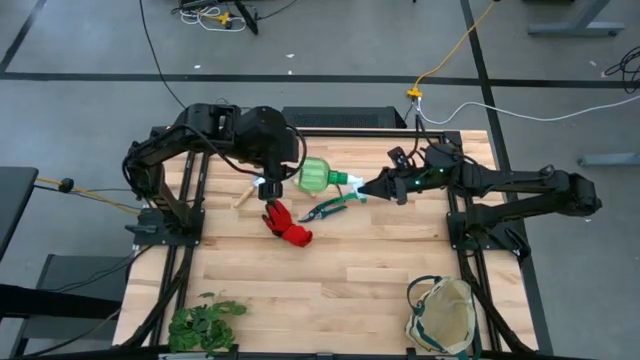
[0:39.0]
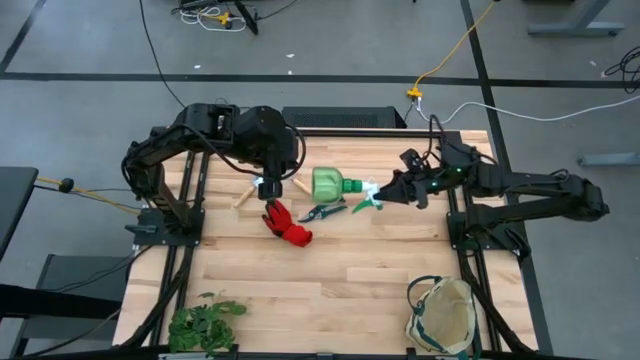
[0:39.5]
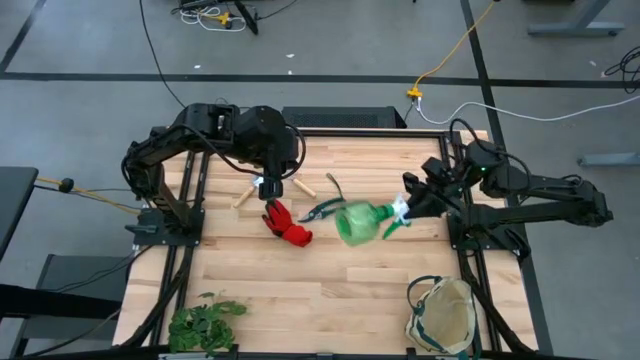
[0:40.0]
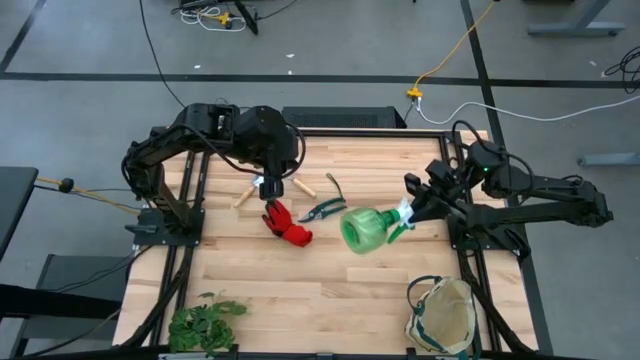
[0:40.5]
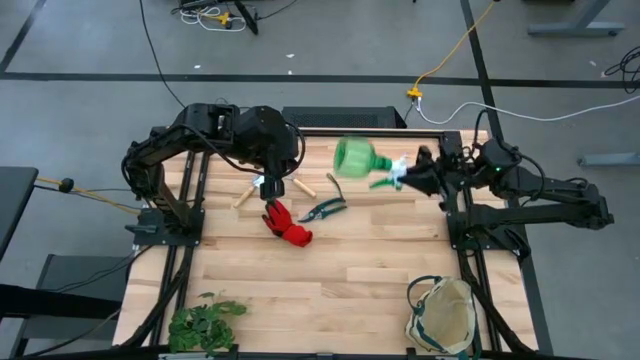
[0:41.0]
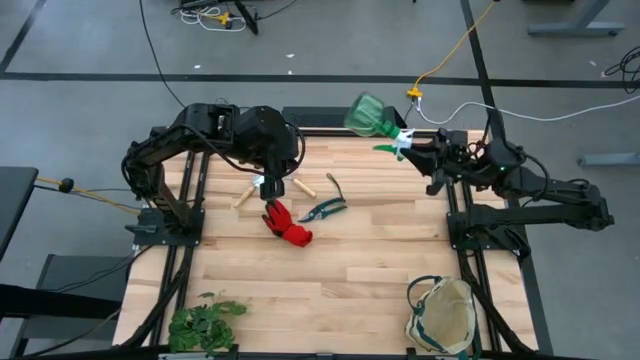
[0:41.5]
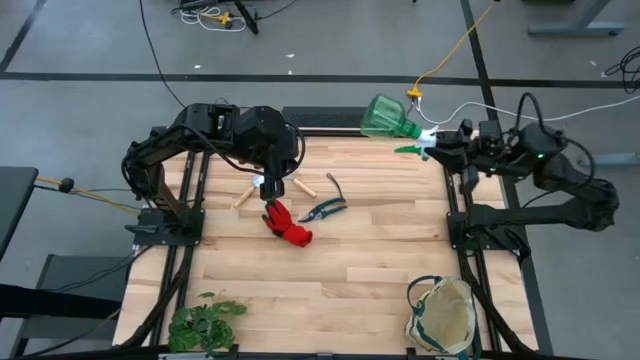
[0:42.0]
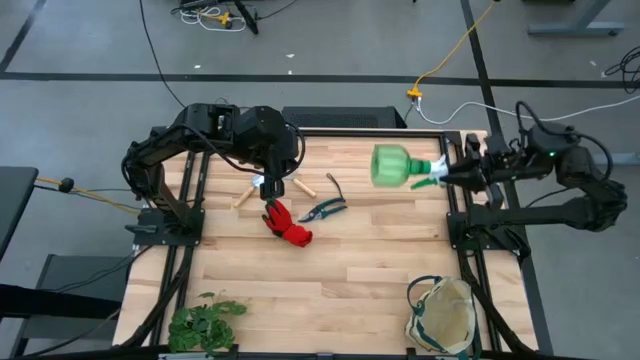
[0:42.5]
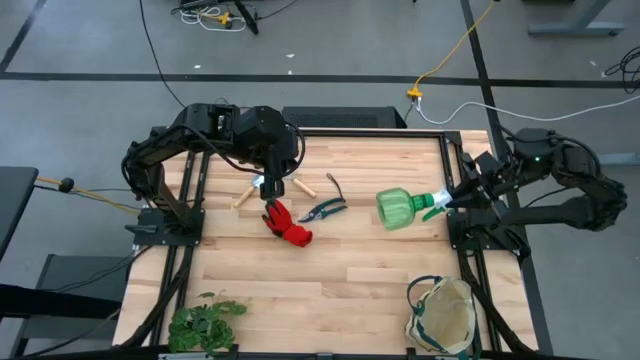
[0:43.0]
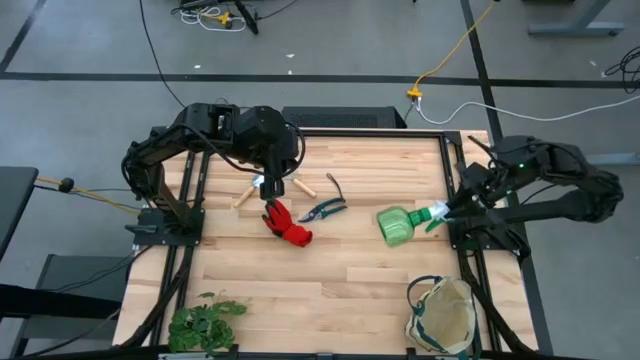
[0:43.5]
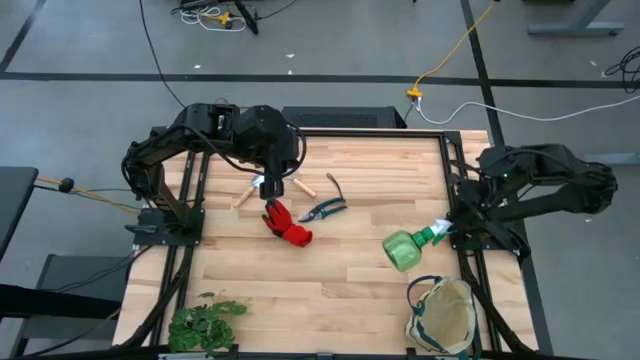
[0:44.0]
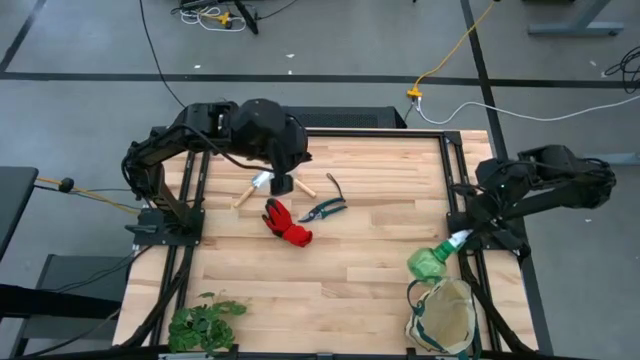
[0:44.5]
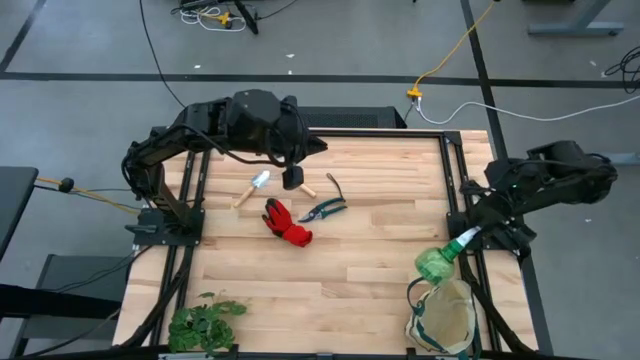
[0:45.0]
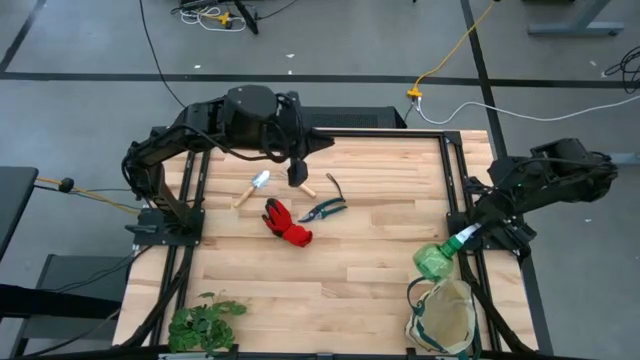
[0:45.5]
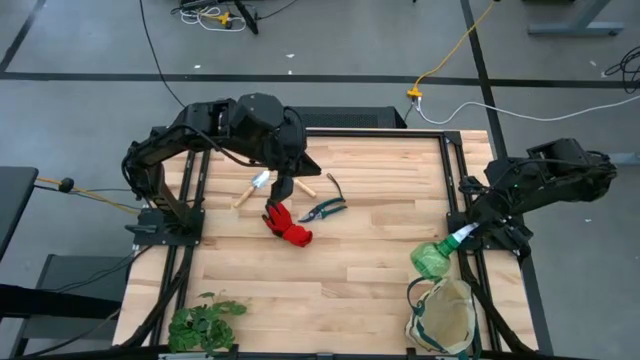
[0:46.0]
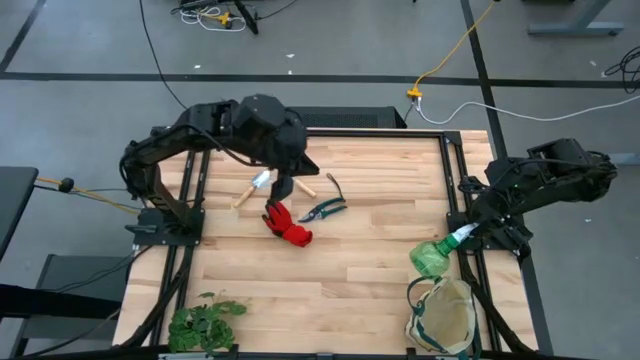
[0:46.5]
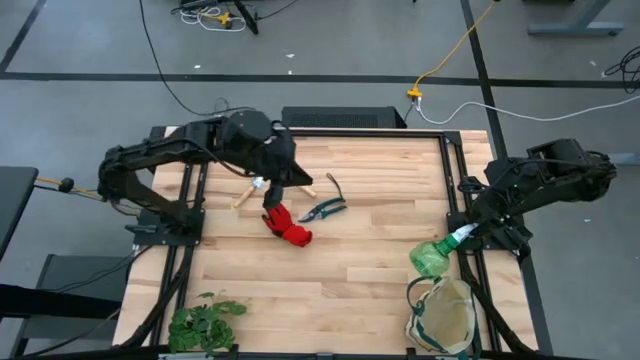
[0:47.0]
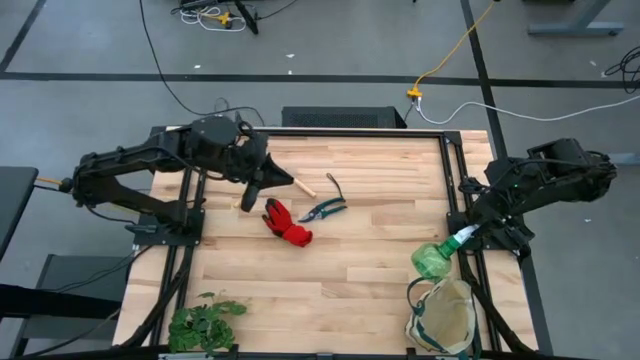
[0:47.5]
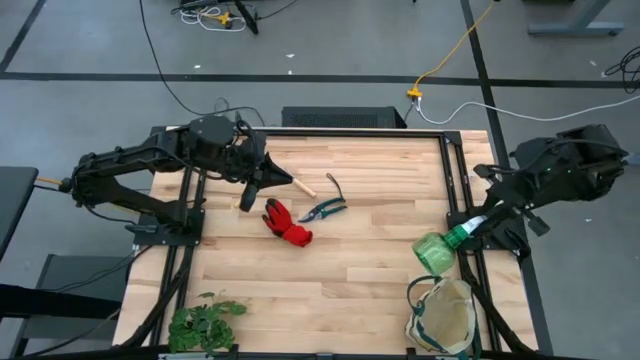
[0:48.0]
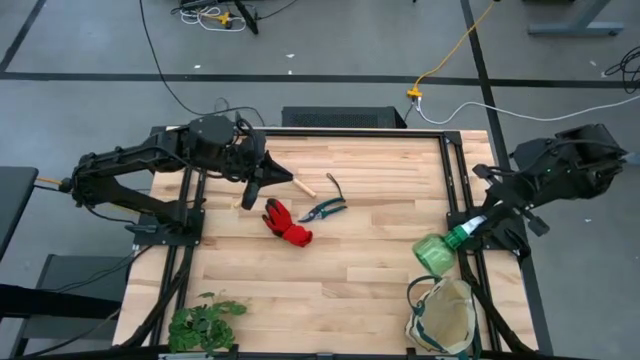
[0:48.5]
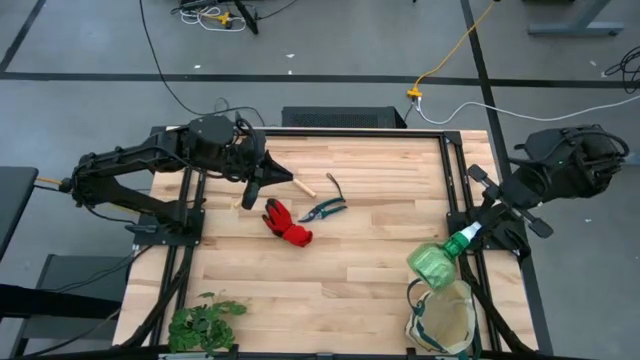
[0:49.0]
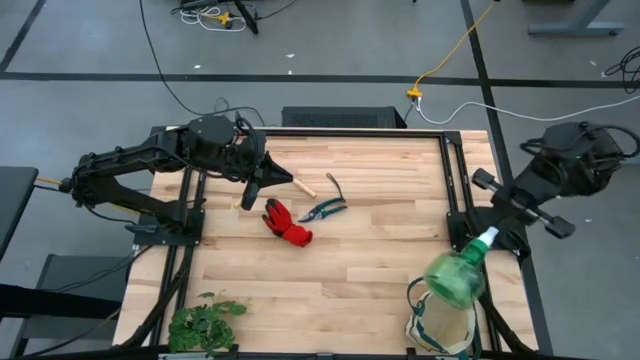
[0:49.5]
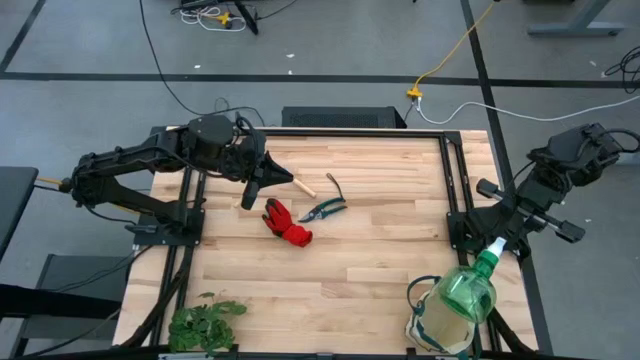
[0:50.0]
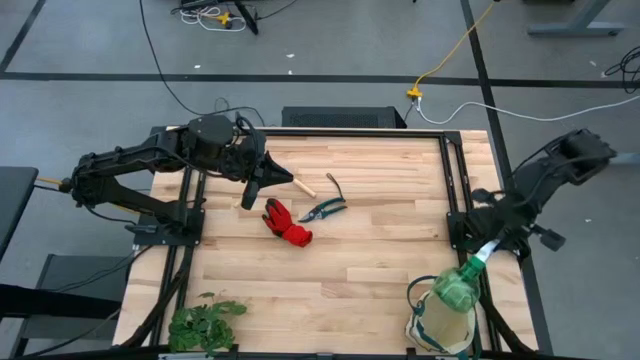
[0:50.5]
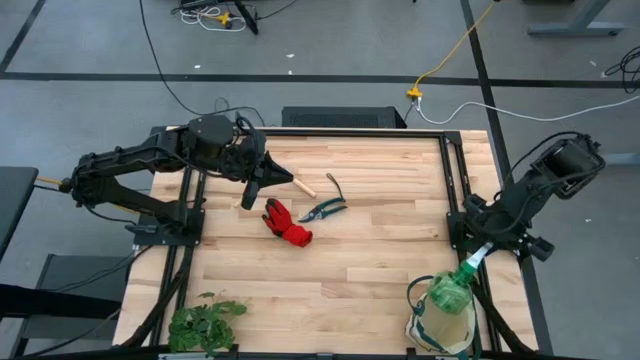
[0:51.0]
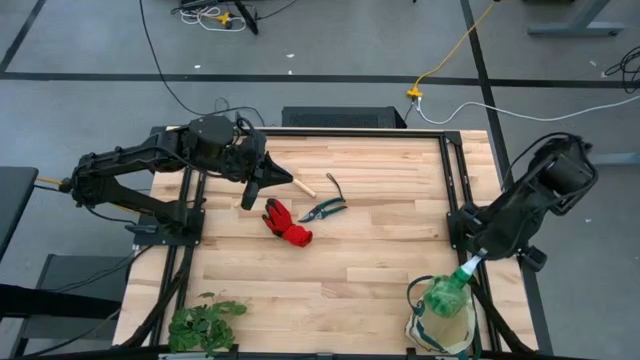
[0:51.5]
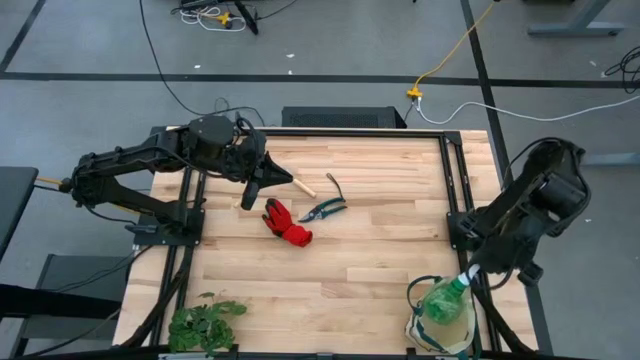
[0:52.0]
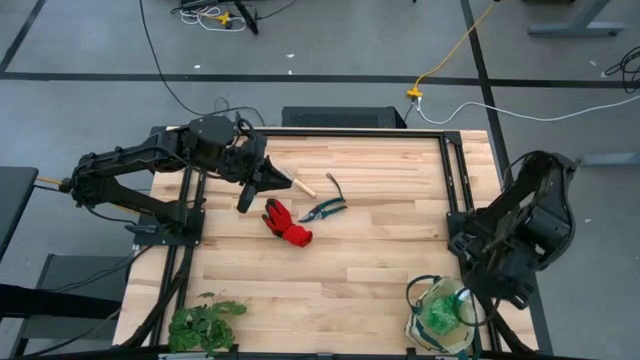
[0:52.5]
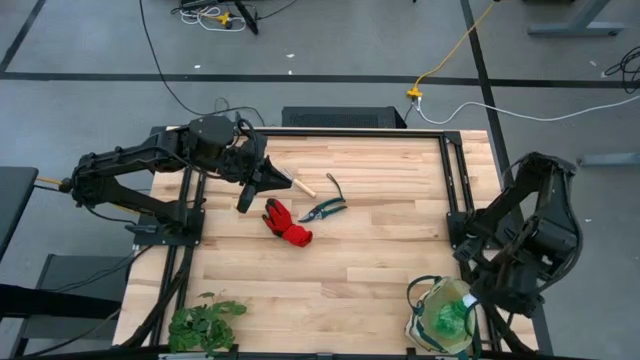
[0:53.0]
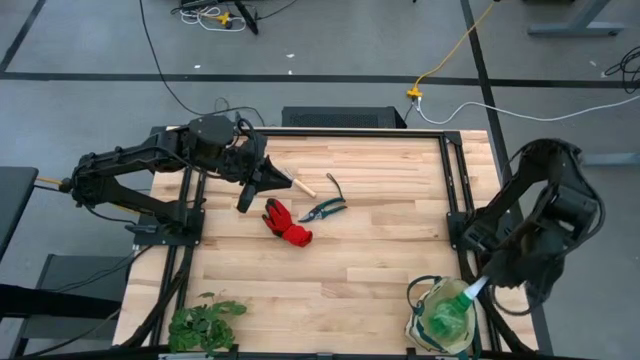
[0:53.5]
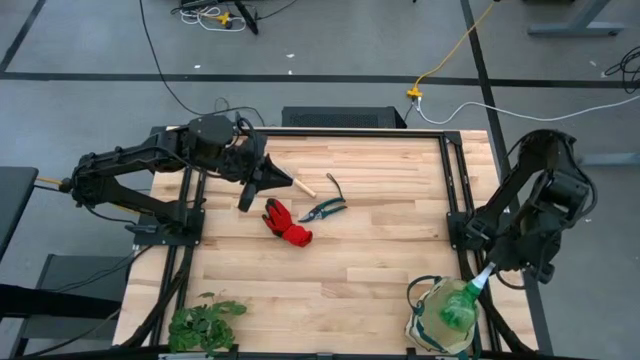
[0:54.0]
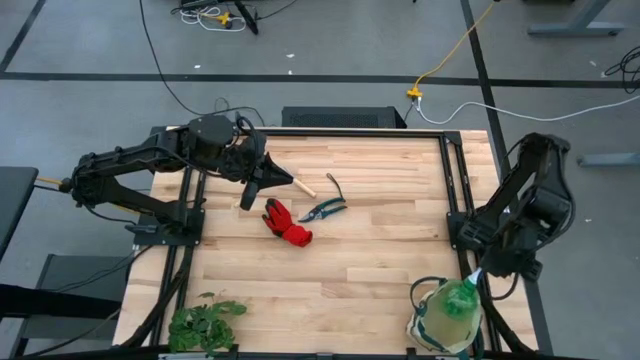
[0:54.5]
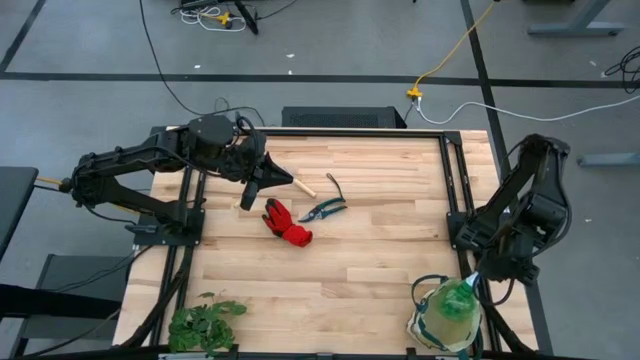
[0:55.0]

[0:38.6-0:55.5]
Task: Pick & Place Garden tools in Gardening bag
Put the green spray into the gardening bag

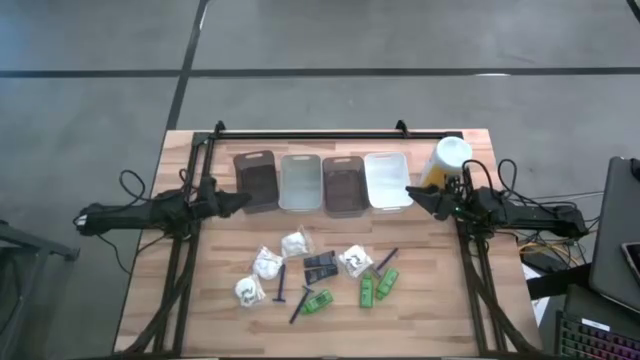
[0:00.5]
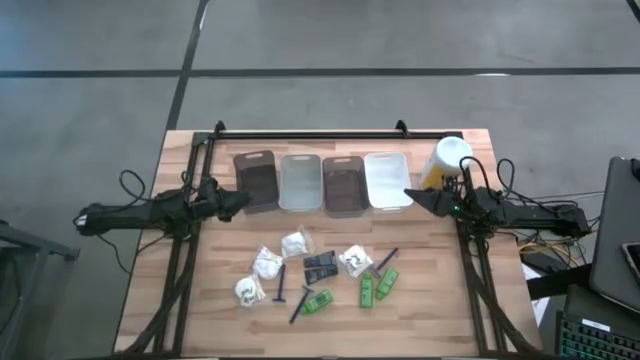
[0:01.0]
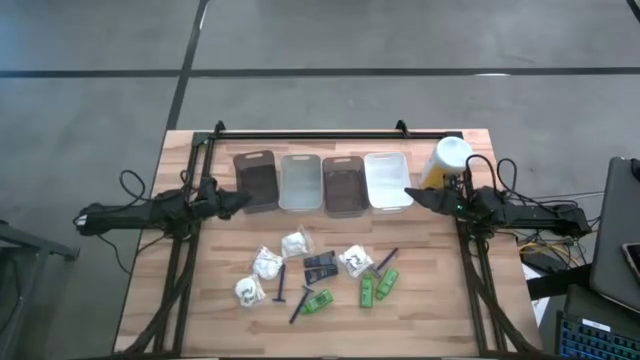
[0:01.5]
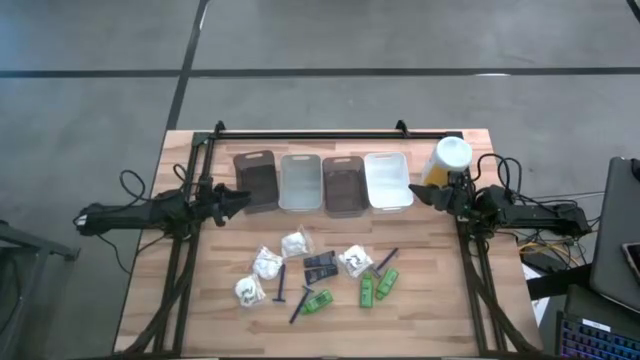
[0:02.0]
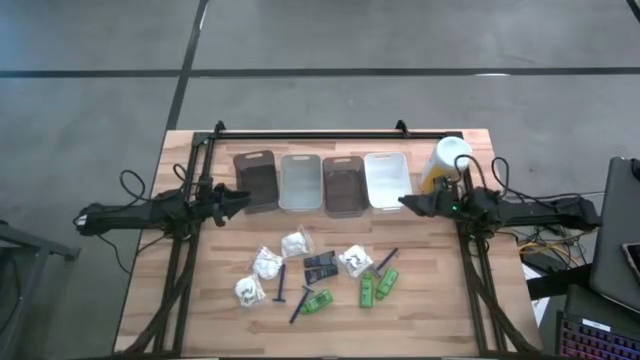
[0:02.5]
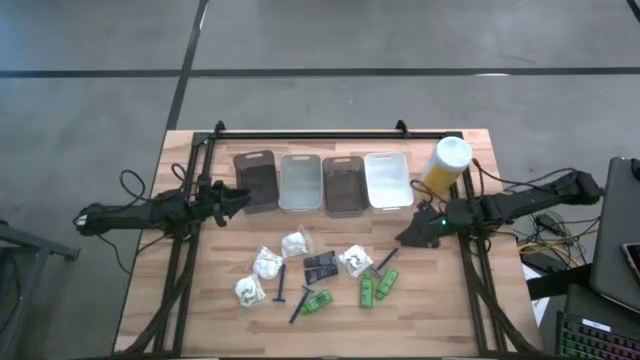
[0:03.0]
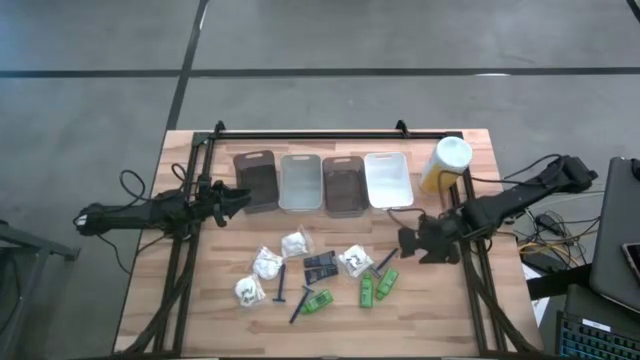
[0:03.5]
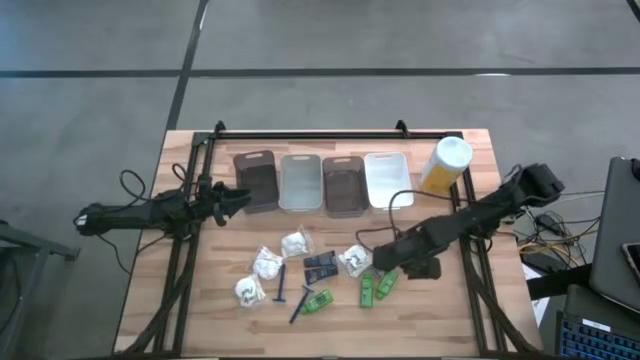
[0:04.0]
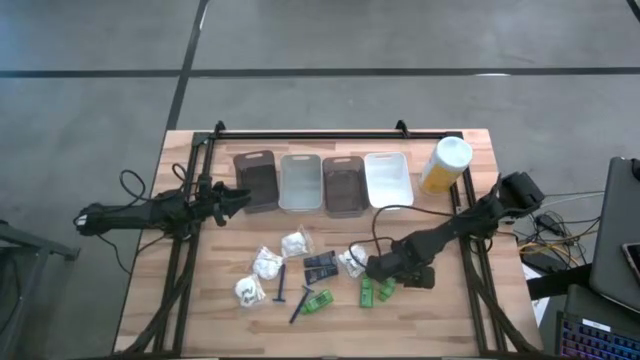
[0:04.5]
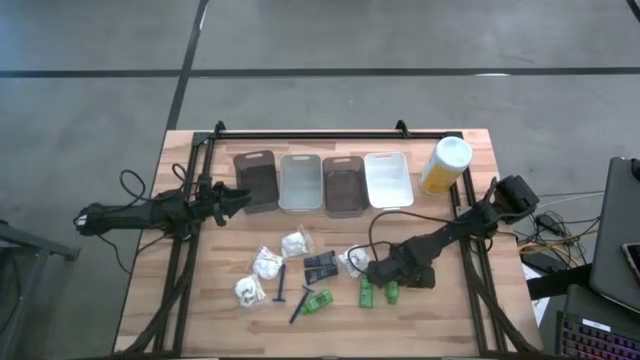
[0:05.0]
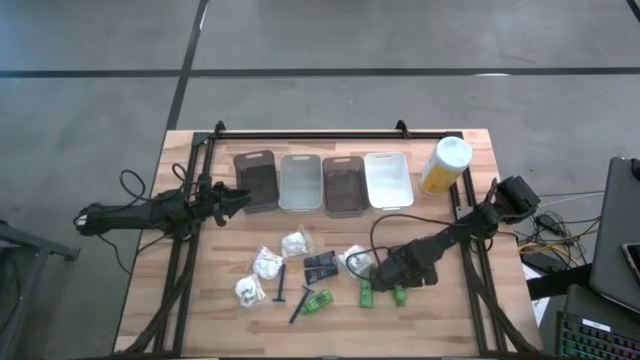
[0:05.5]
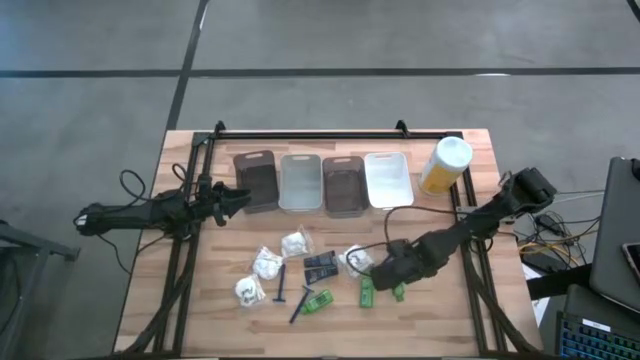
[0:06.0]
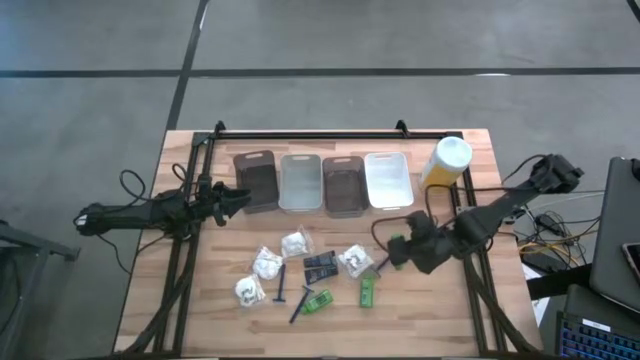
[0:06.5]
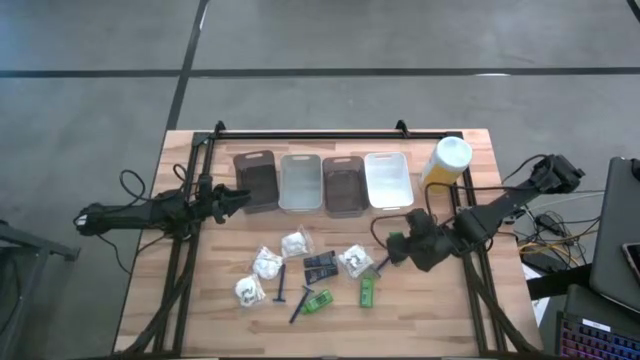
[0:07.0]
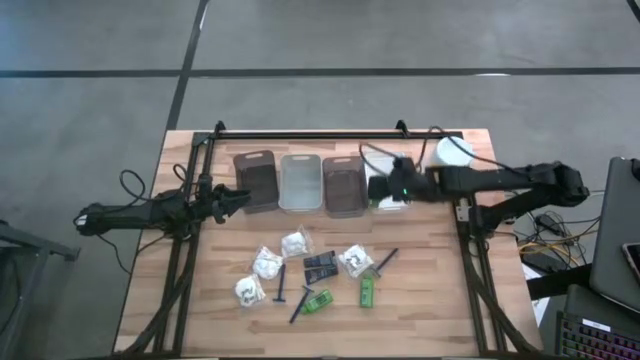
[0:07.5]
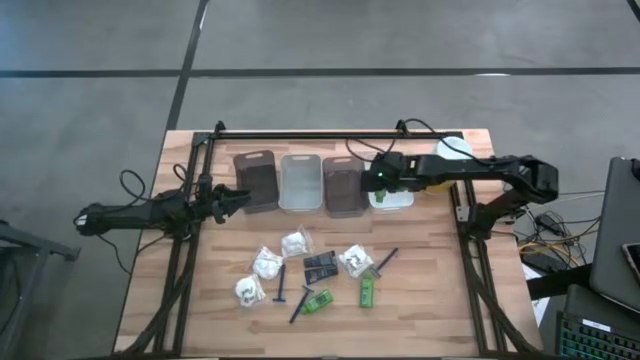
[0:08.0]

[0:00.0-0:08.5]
Task: Pick & Place Travel size toiletries
Put the green shampoo into the white bin
